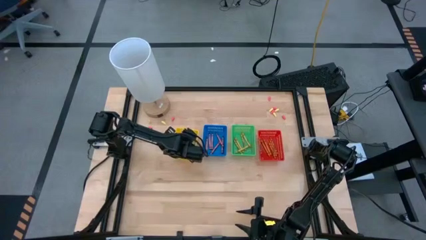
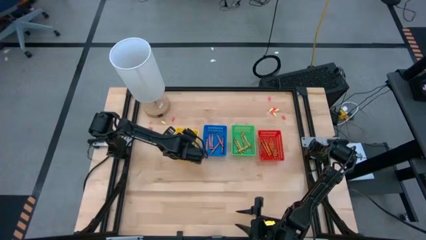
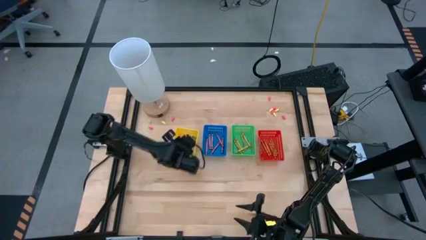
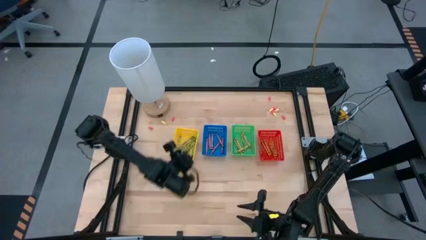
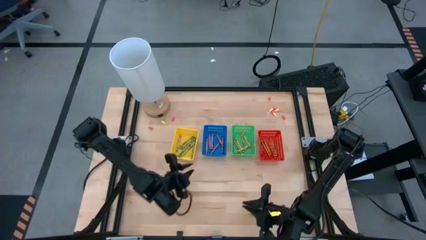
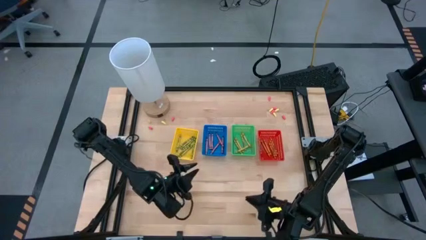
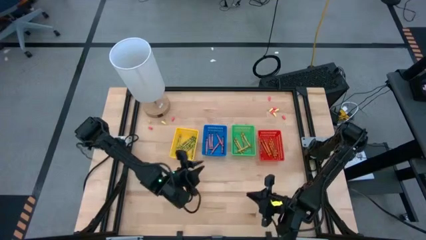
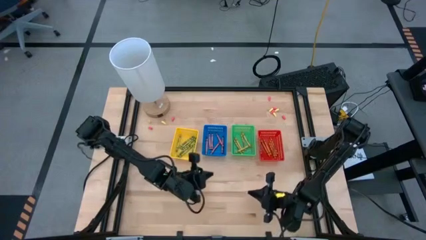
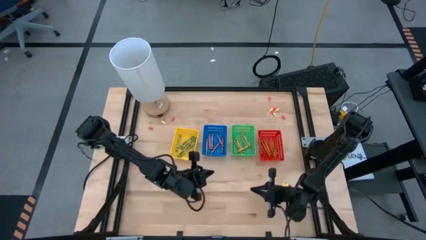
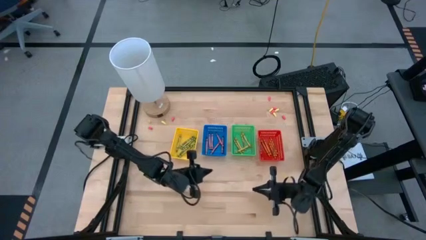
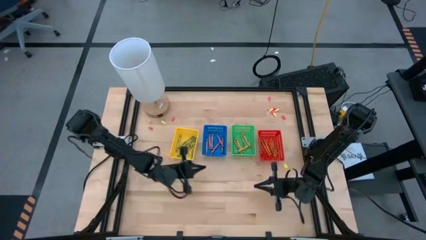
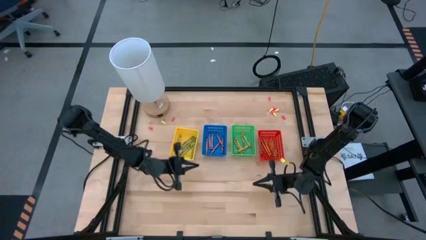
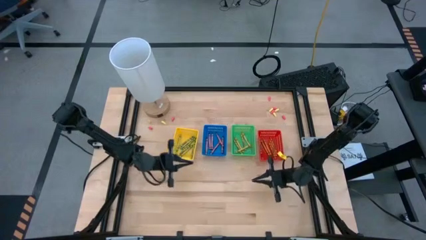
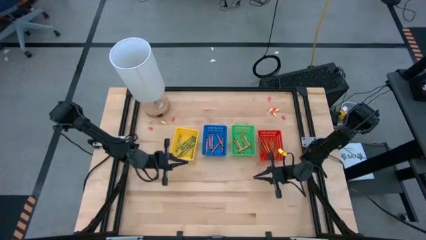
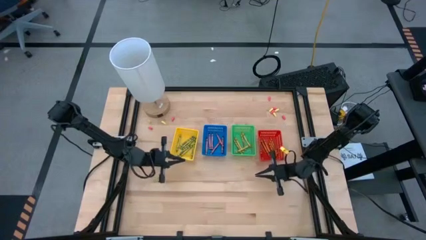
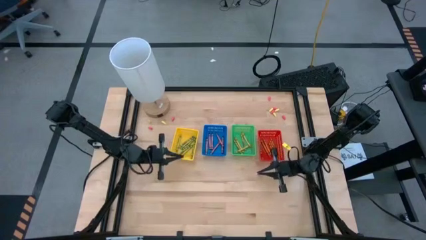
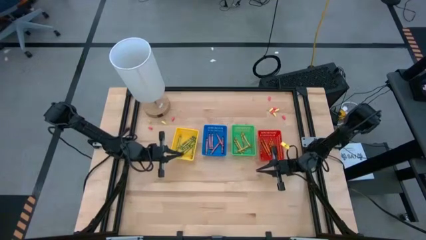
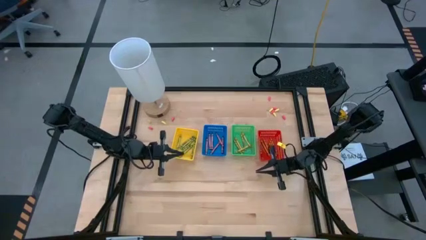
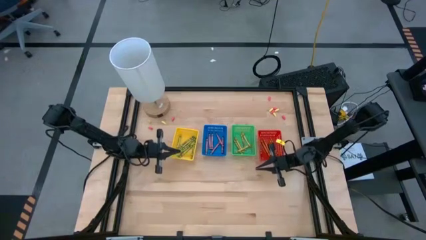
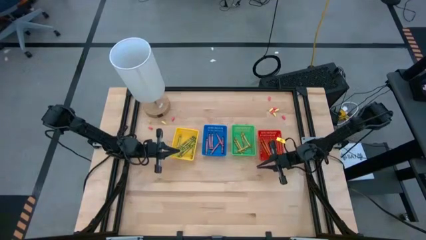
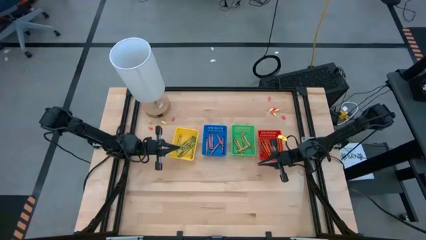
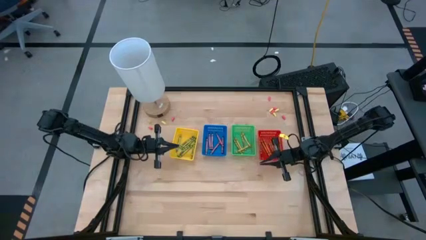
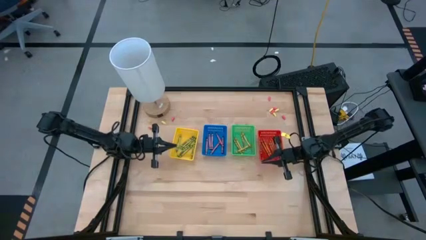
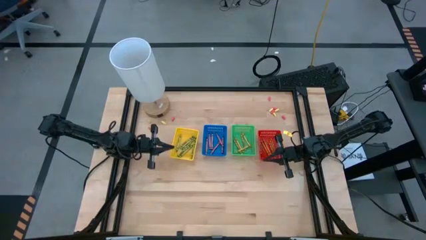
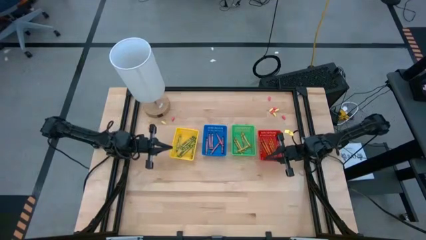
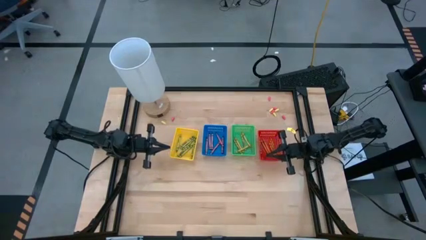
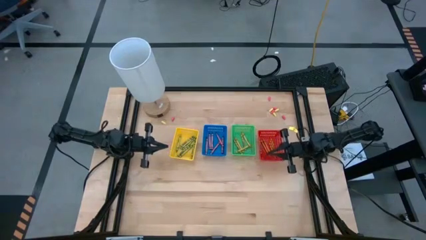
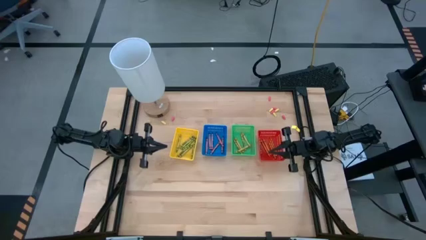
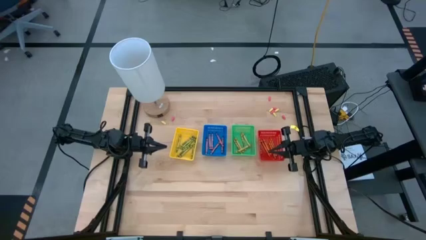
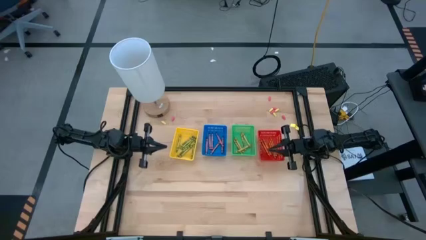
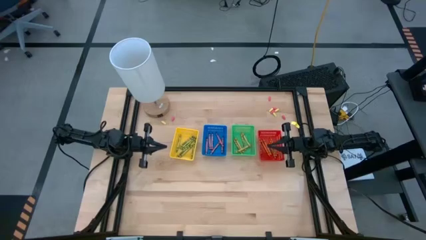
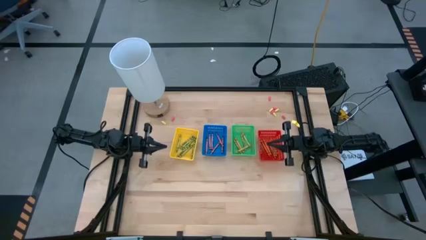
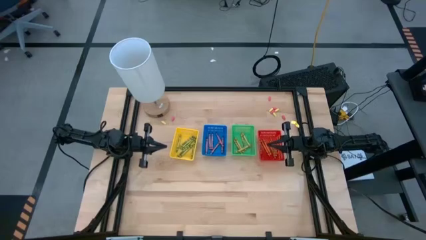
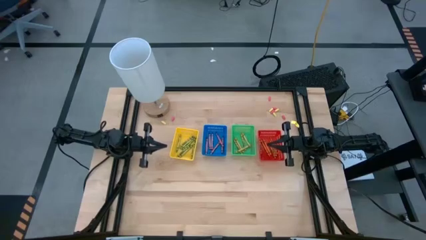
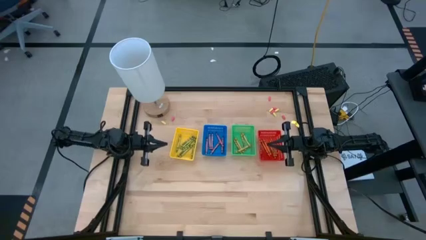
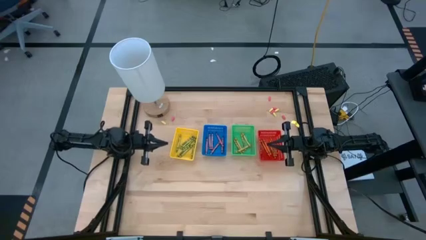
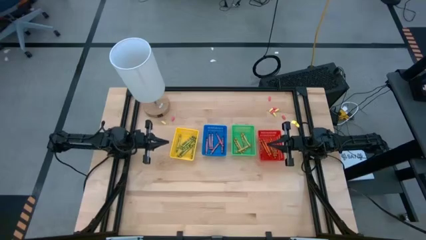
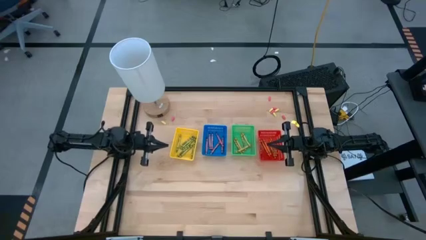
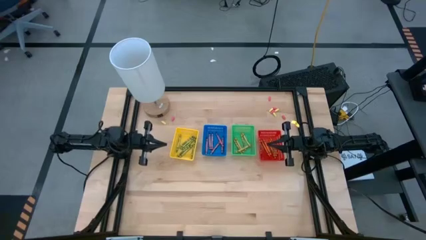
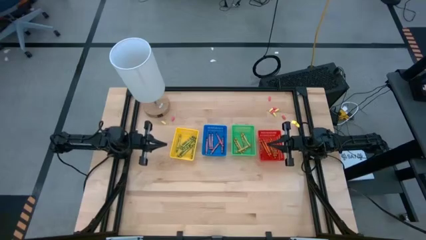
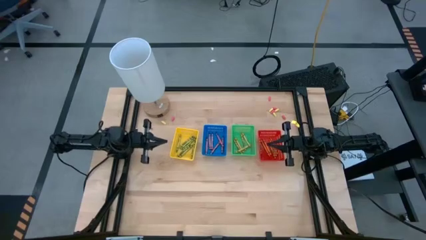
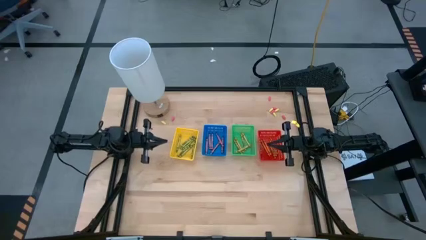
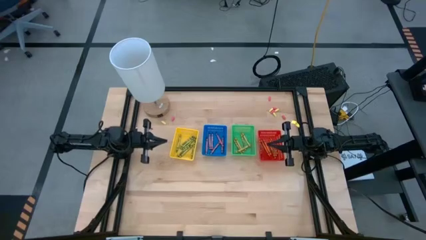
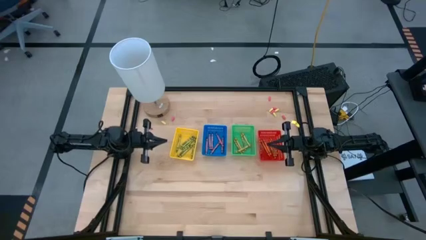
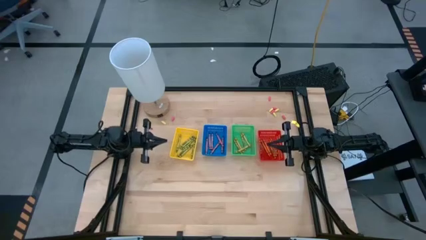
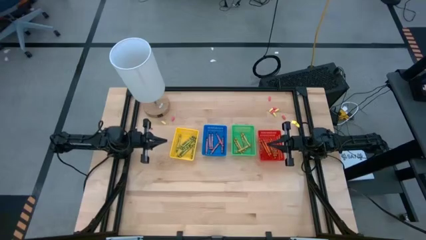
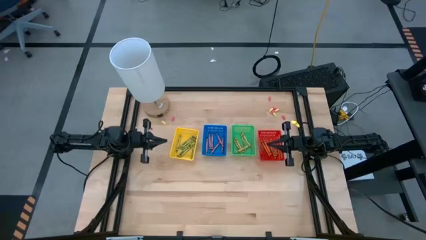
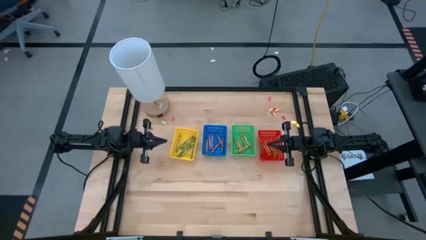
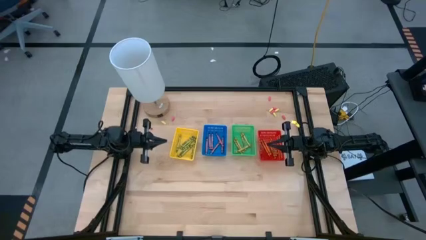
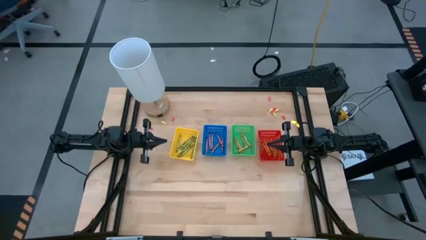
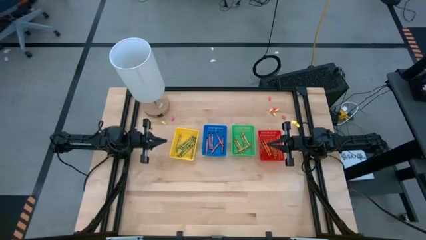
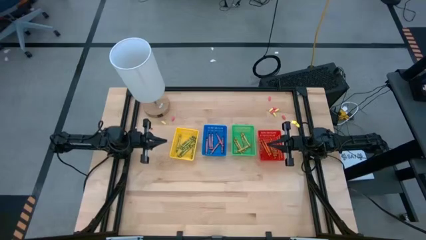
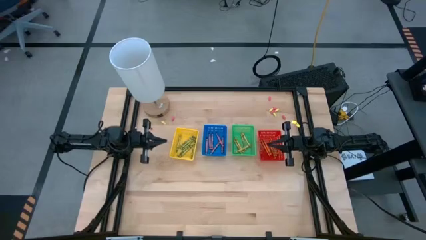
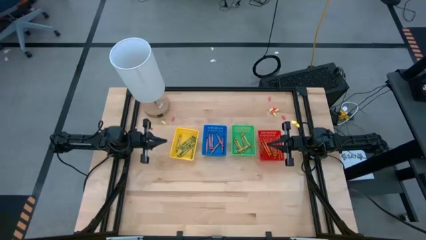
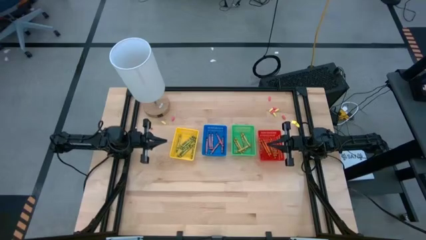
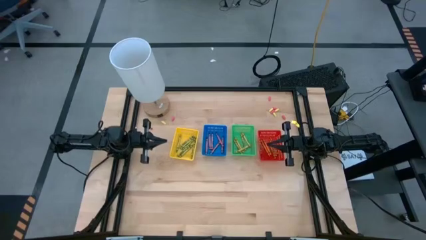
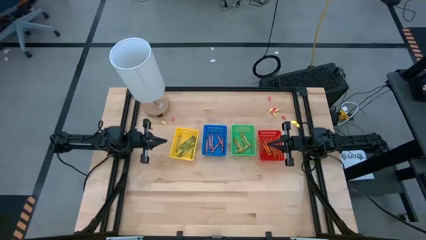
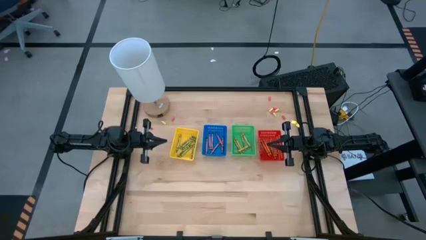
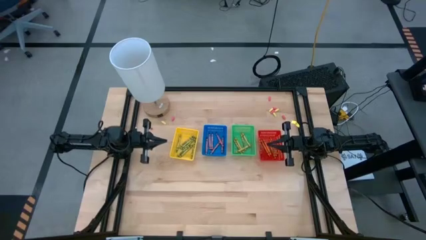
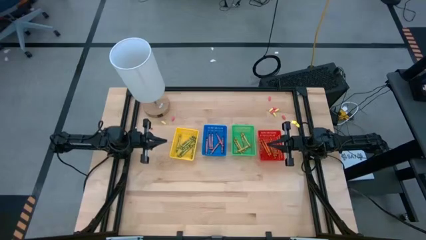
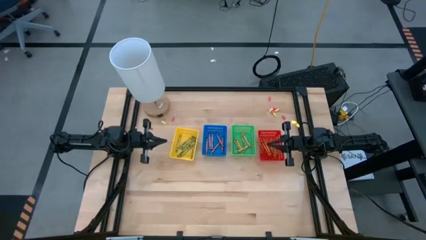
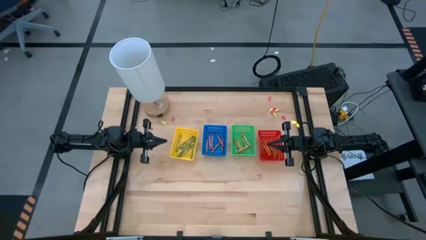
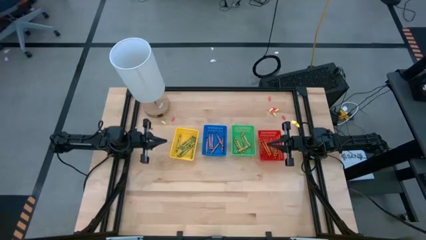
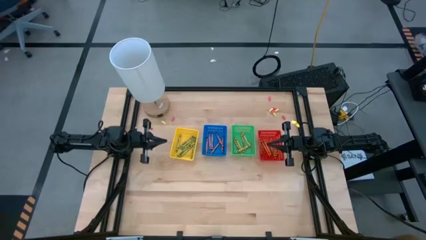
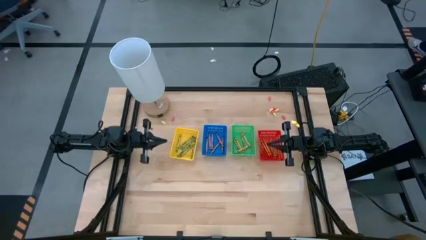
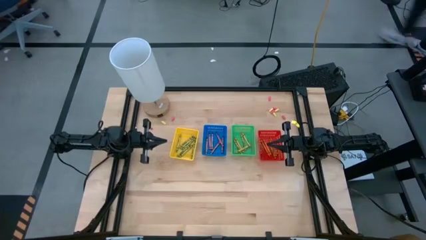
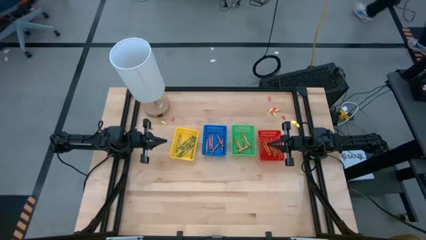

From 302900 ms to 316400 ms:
Task: Sort crayons
Return to Home Position

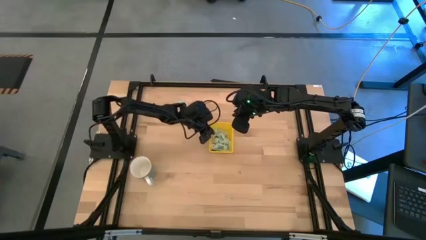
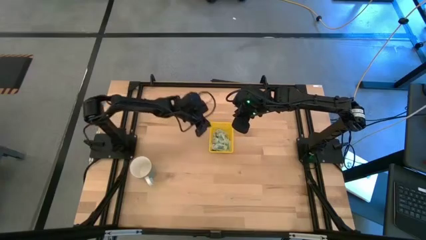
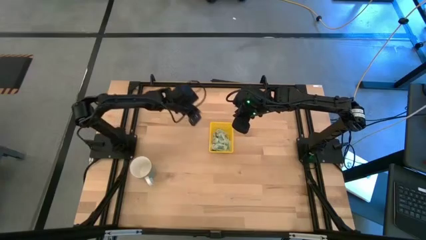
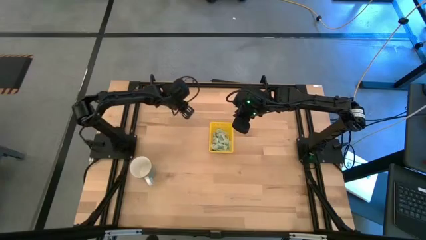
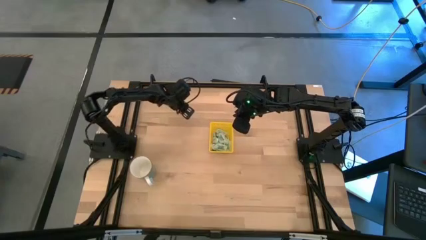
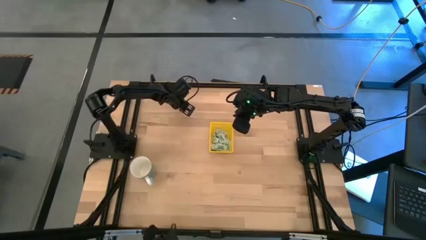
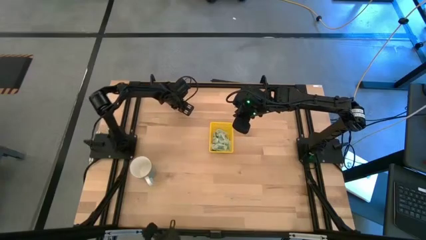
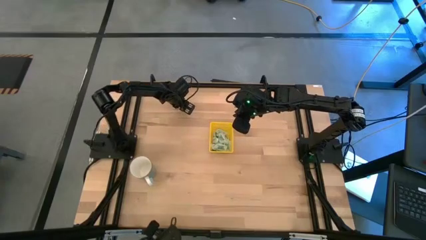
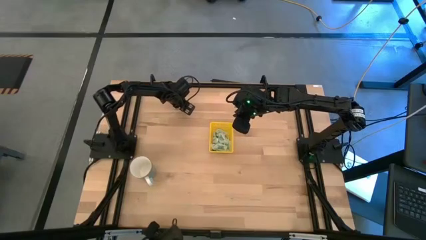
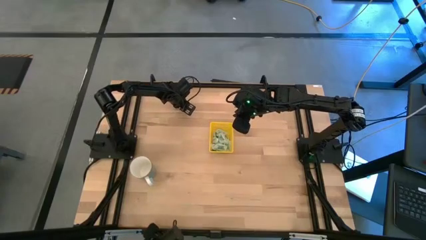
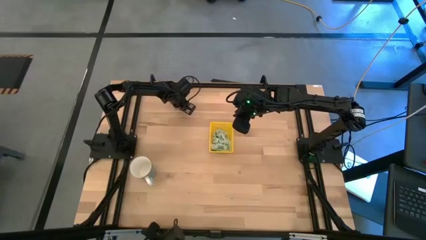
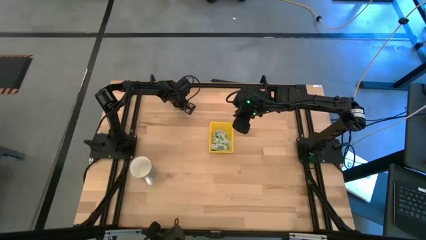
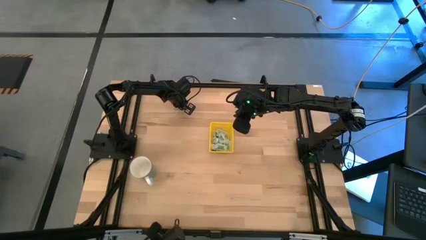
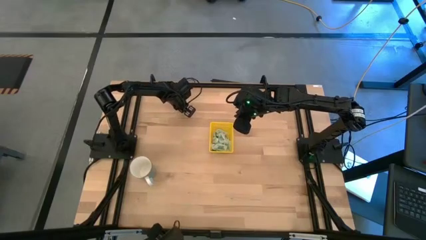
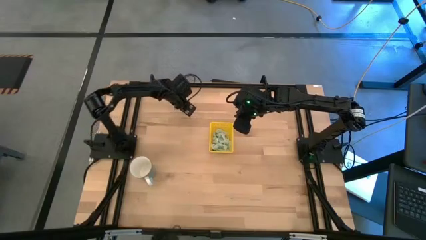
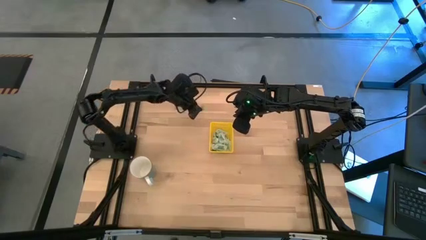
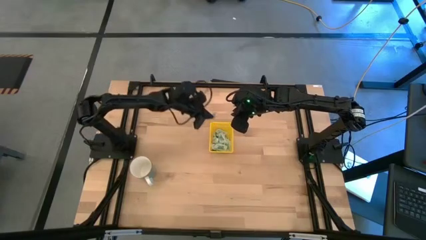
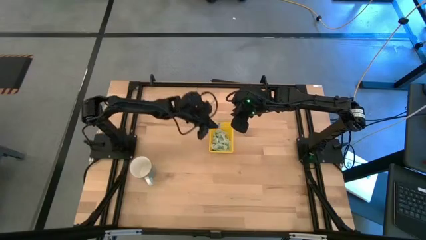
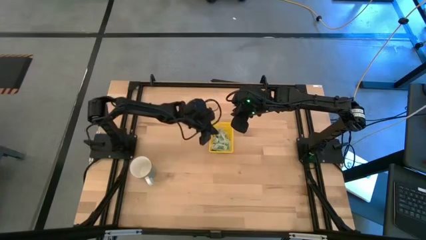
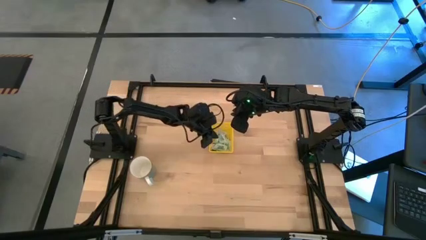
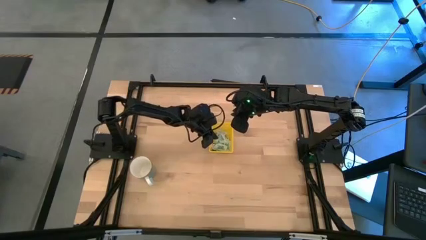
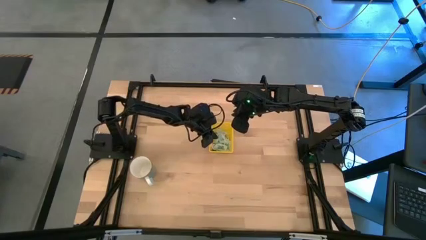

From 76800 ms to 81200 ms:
Task: Pick and place Stevia / Truvia into bins
Put the white stevia packet into the yellow bin
